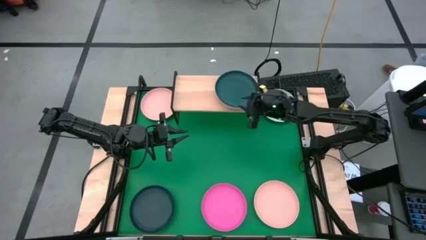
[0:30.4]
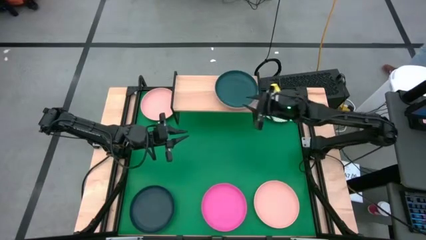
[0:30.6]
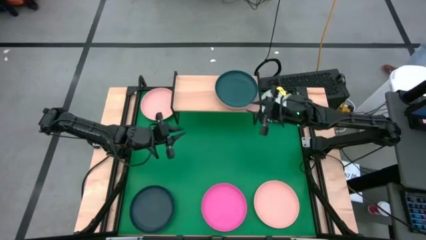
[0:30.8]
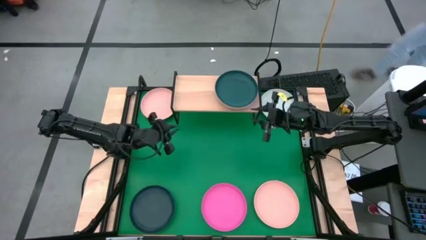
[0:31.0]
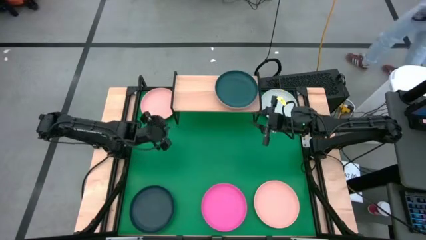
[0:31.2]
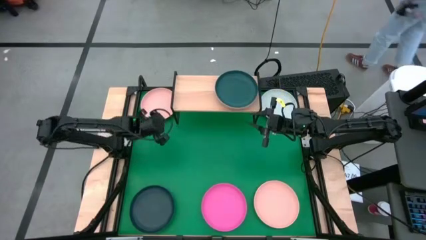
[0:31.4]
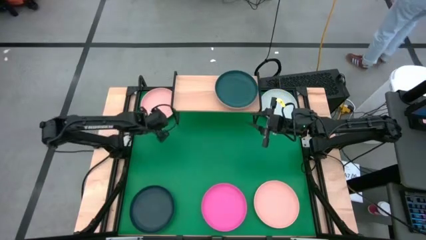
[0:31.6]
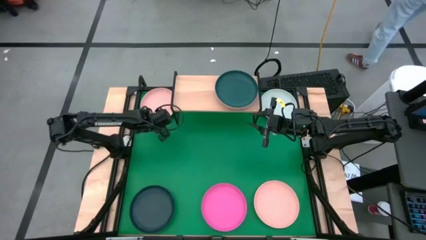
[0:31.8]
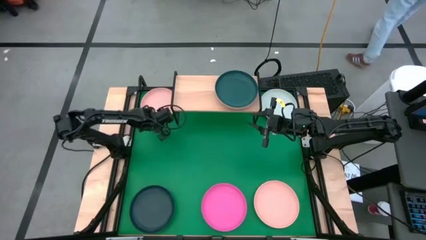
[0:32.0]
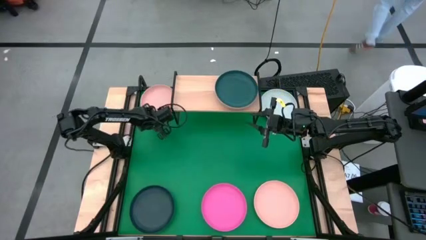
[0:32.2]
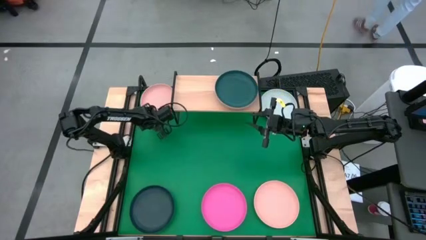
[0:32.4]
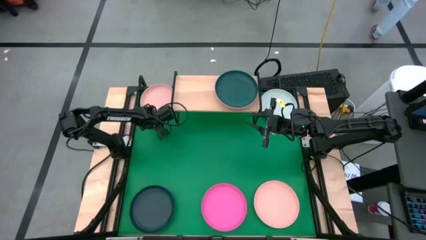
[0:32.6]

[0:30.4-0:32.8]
Task: Place and stack plates onto a shelf
Stack the top light orange plate on top of the green plate on the shelf

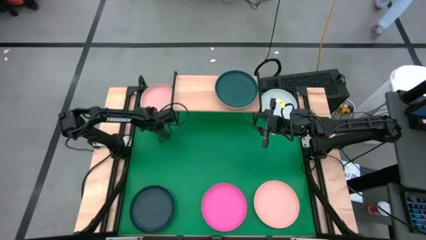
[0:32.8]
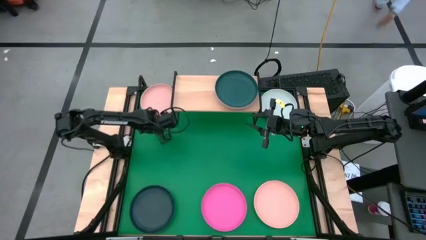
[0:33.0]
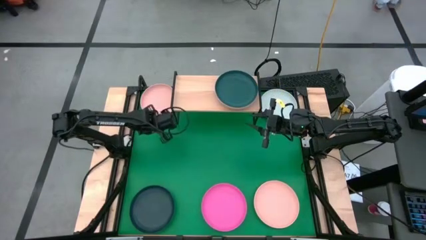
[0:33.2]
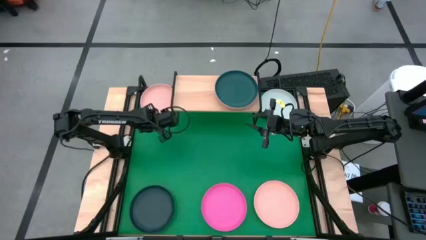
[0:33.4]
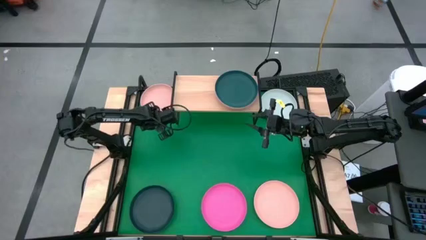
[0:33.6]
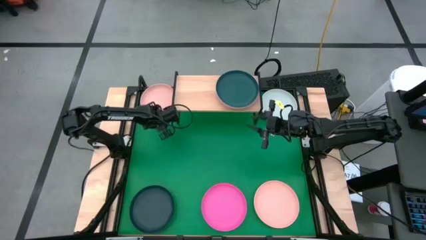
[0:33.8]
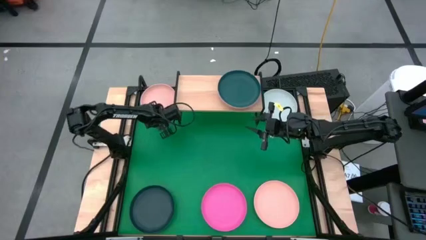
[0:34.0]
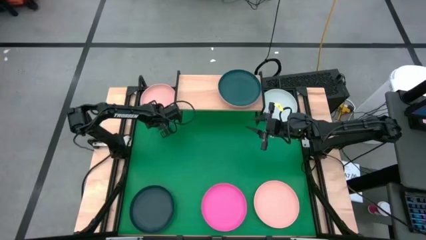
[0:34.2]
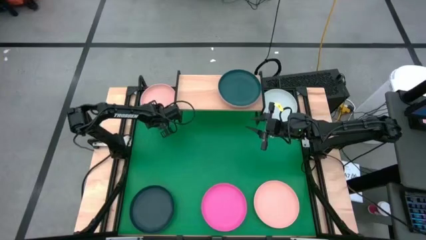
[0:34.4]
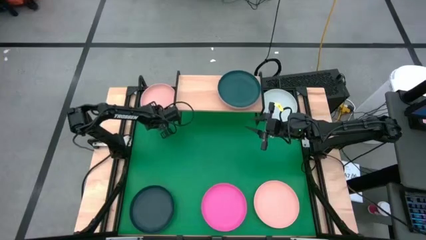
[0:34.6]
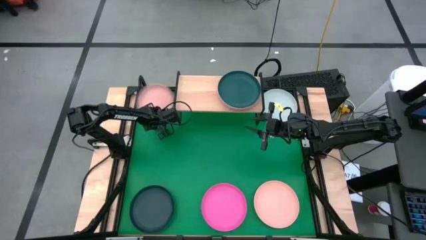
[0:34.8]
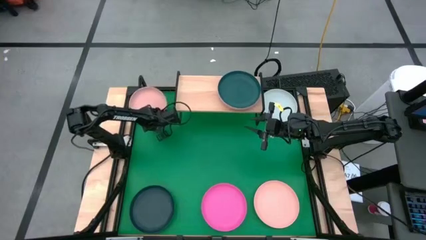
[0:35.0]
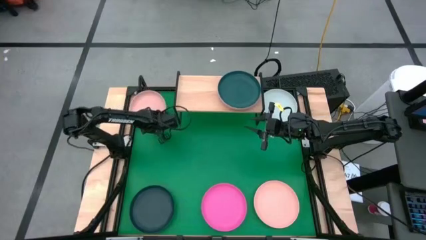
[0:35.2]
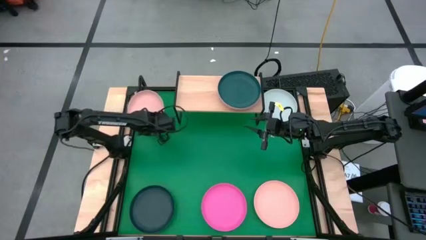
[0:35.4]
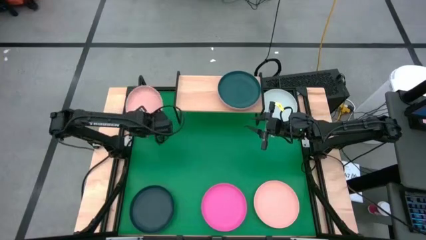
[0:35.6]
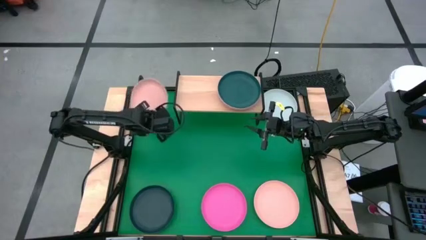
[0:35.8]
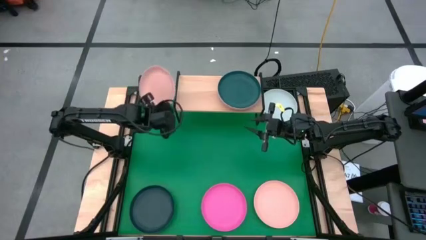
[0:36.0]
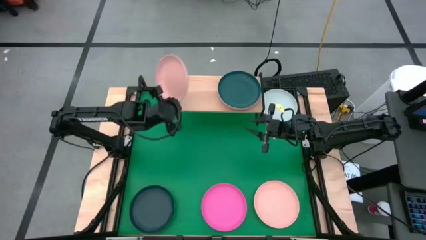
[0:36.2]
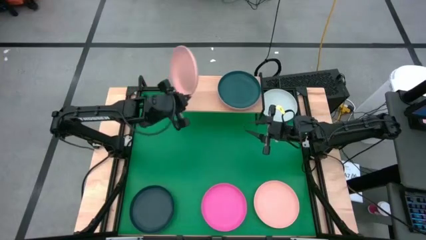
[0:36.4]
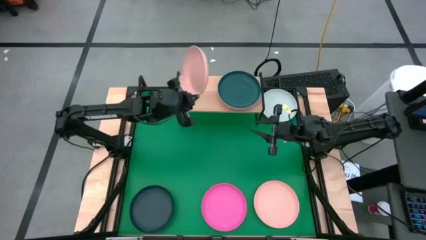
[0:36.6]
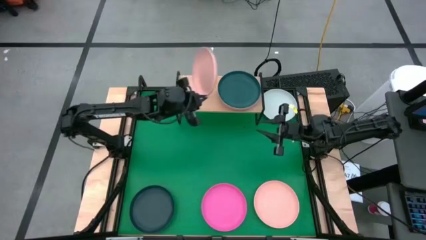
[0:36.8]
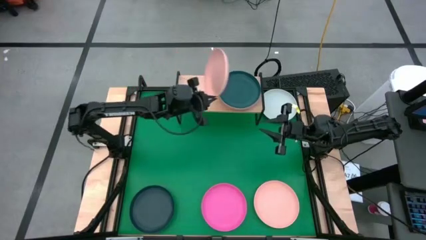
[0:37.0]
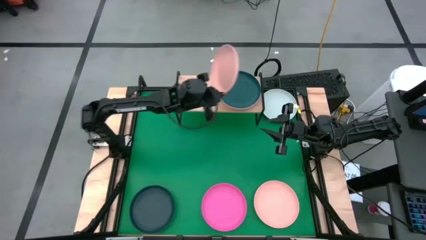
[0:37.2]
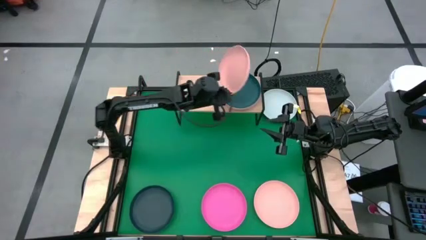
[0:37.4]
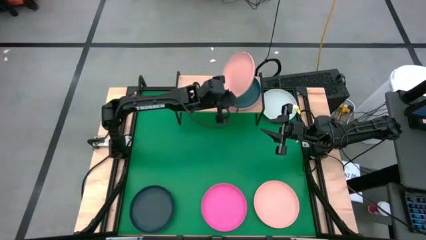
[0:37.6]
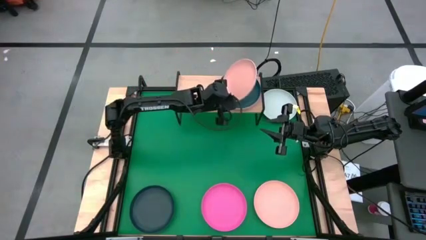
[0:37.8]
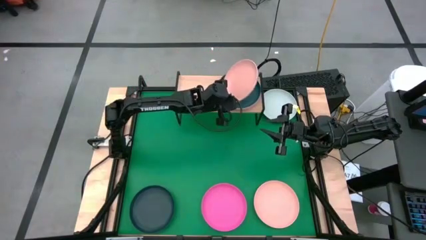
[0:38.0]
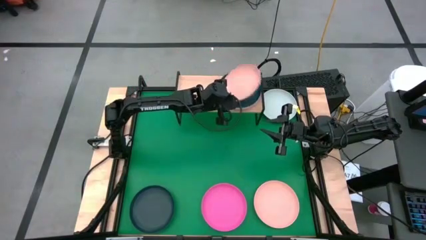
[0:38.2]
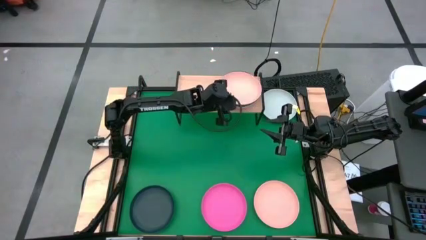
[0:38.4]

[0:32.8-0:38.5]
Stack the top light orange plate on top of the green plate on the shelf

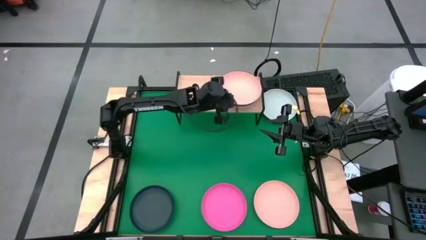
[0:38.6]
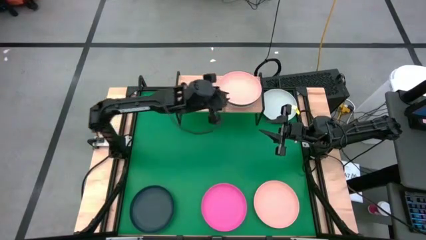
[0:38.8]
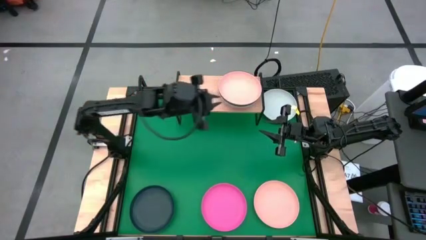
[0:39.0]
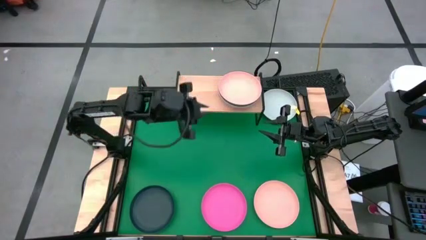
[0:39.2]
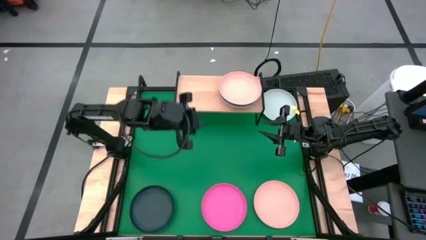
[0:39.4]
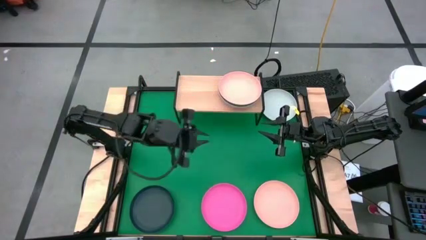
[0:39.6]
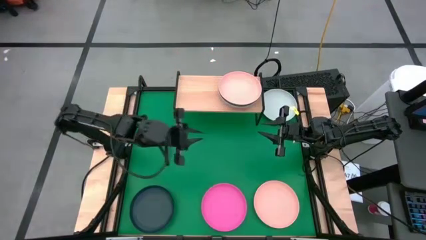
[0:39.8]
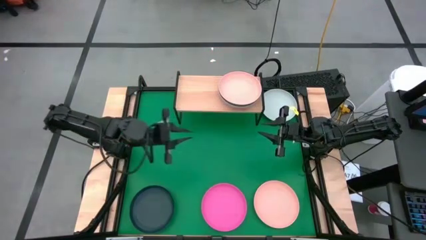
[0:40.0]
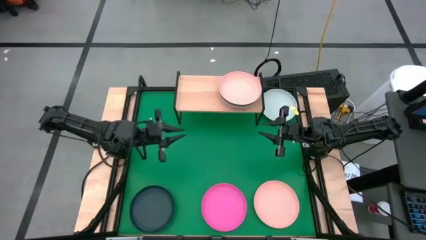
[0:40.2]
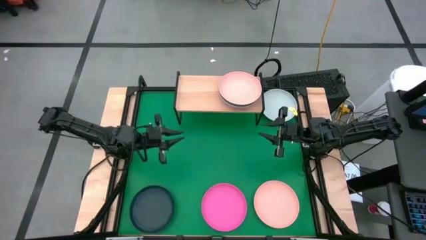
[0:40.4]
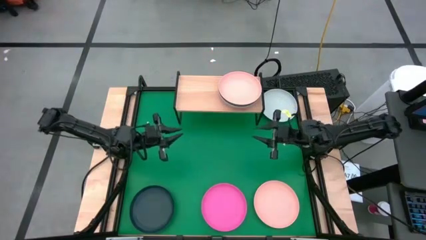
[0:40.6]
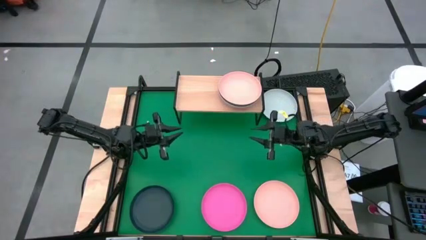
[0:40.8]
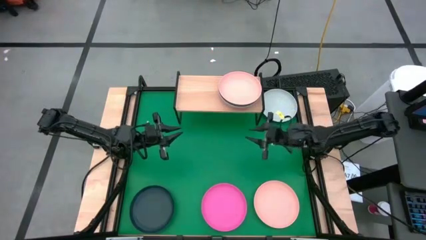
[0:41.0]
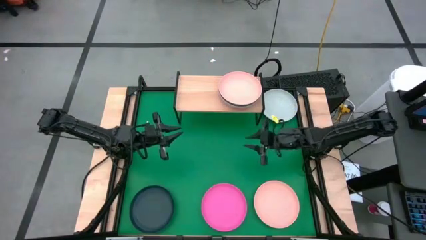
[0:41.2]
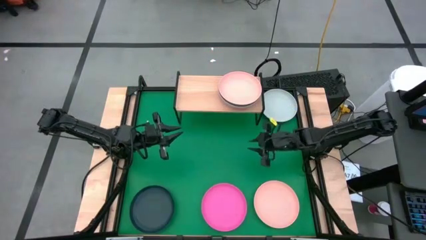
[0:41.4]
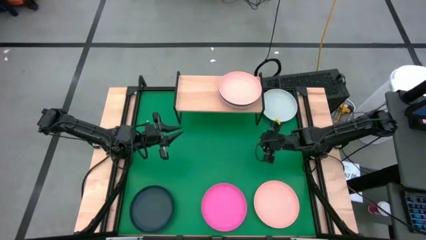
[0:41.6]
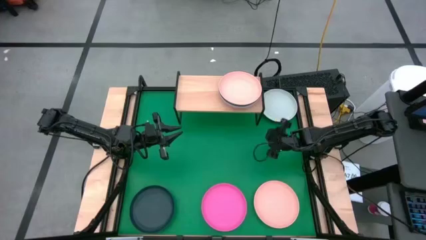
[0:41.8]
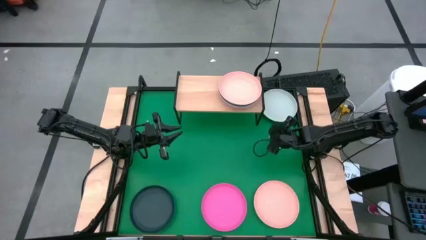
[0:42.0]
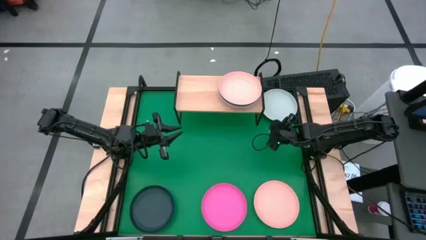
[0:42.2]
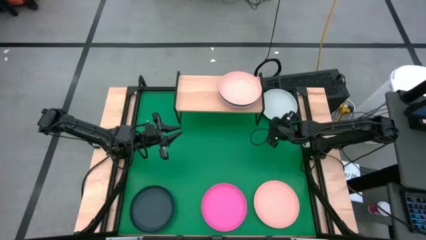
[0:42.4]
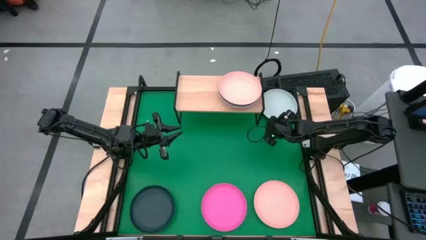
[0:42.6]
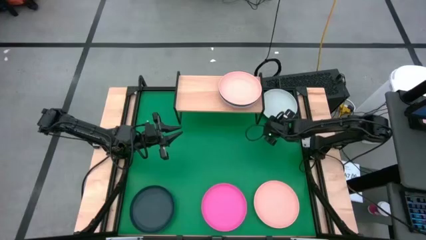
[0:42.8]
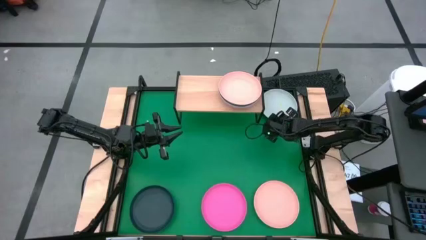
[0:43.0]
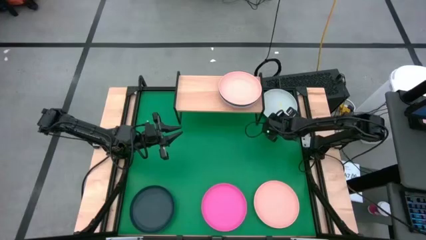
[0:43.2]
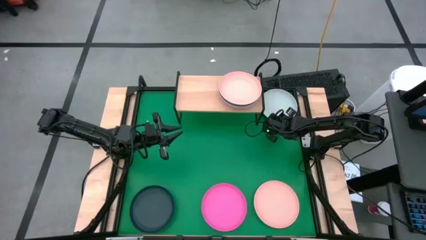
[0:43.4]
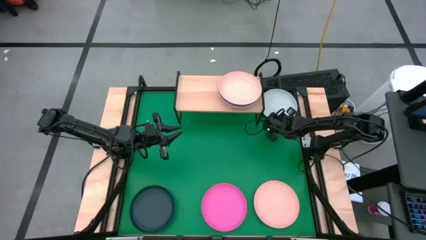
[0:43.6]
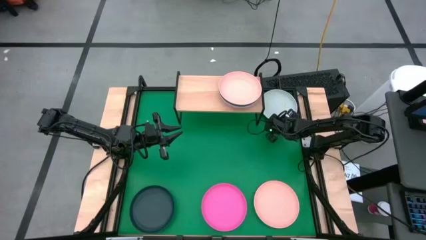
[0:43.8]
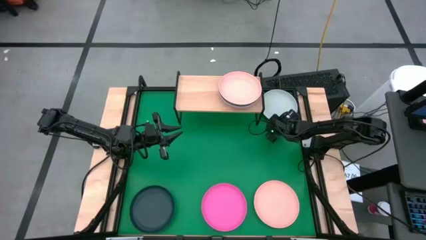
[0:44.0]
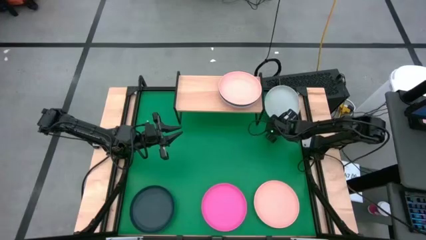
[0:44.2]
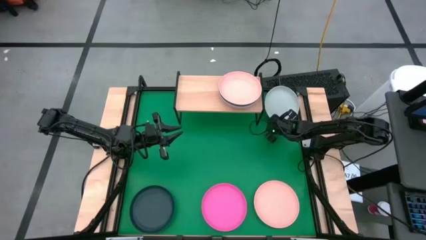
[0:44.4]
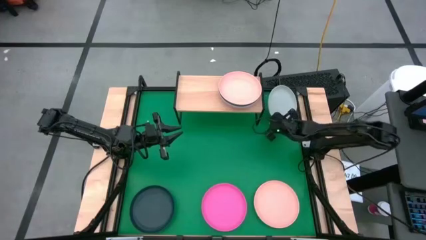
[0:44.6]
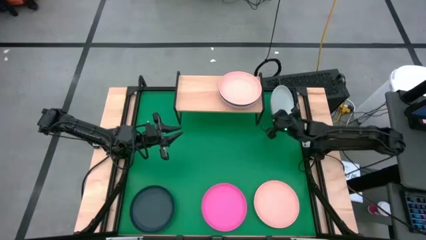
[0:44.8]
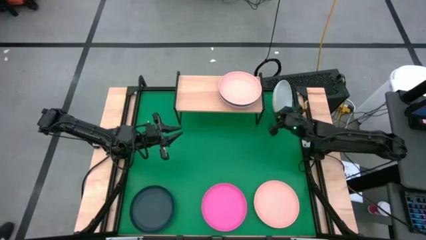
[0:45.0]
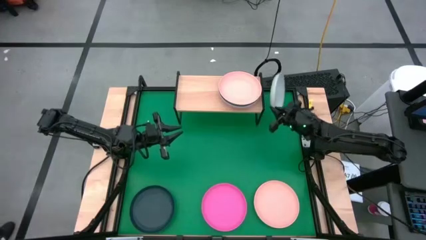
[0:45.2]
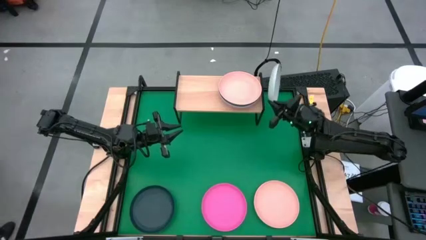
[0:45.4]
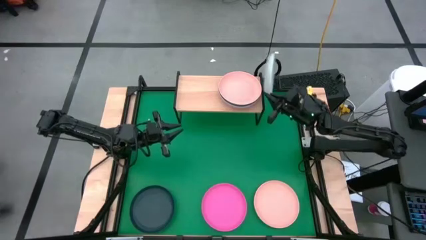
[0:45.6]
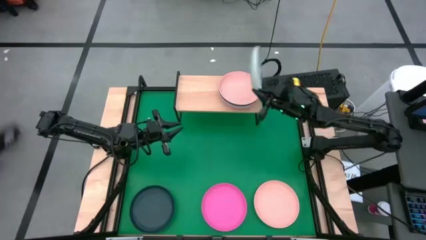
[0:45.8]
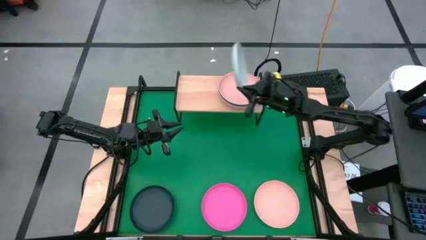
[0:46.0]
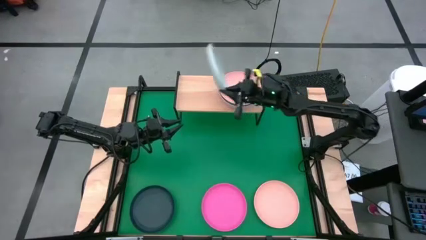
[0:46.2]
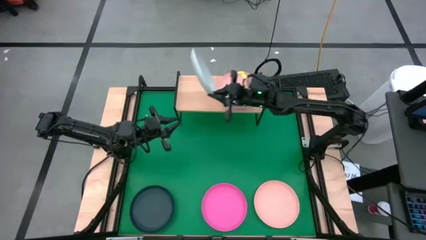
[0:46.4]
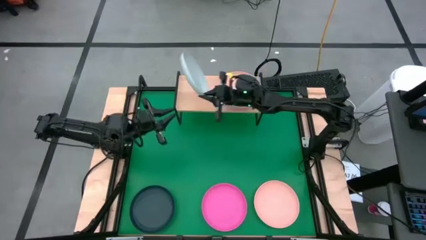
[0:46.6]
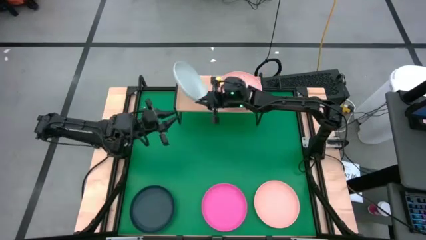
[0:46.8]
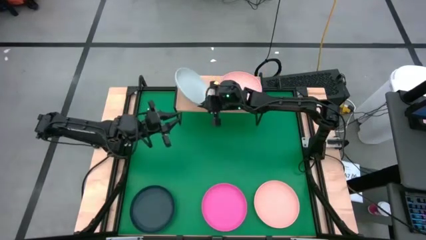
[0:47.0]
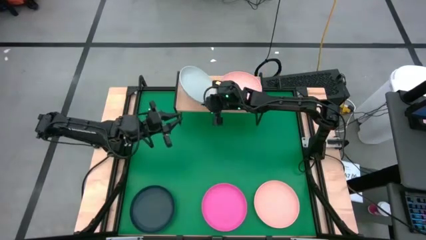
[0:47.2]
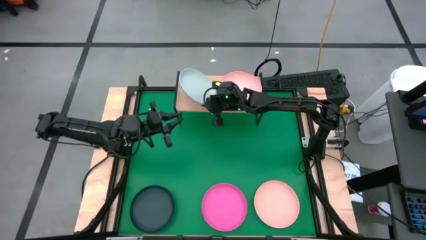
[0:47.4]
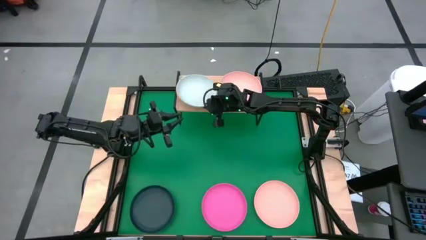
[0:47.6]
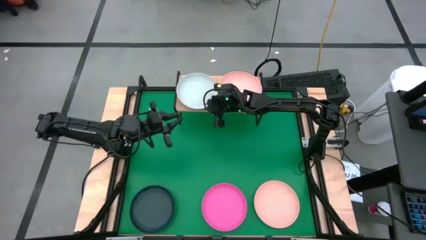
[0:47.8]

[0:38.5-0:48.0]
Put the white plate on the shelf
